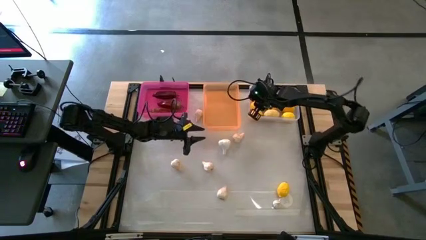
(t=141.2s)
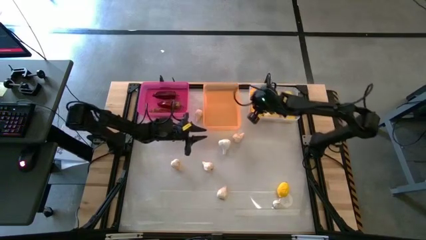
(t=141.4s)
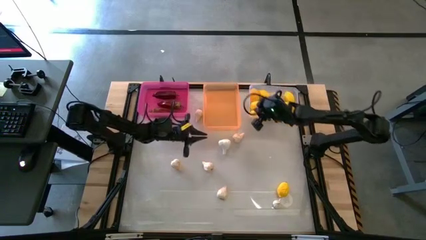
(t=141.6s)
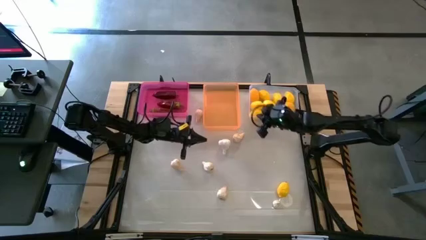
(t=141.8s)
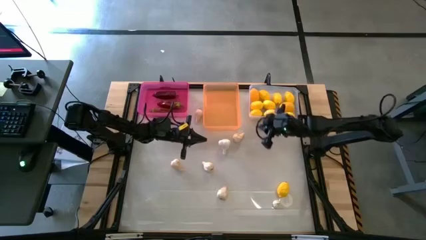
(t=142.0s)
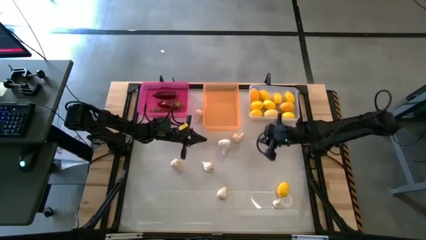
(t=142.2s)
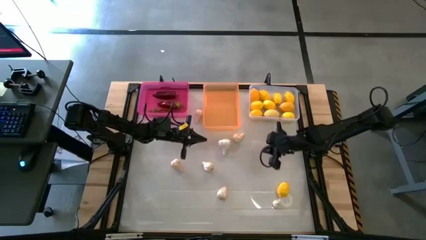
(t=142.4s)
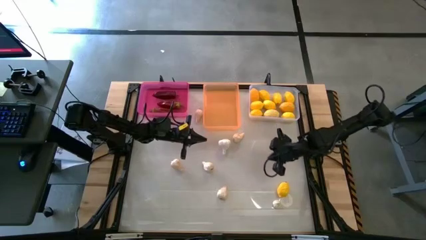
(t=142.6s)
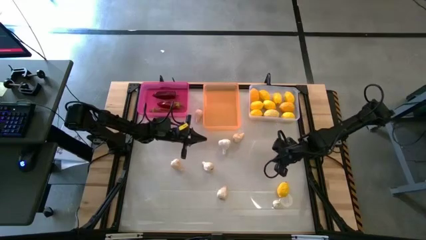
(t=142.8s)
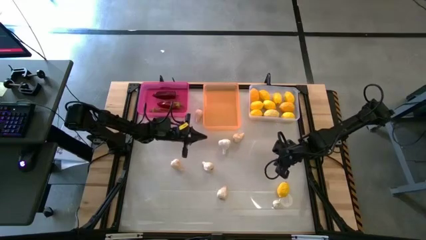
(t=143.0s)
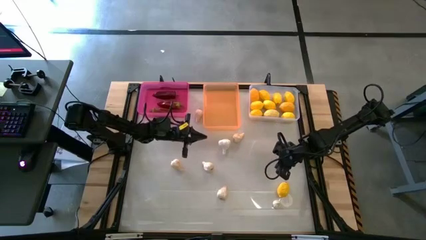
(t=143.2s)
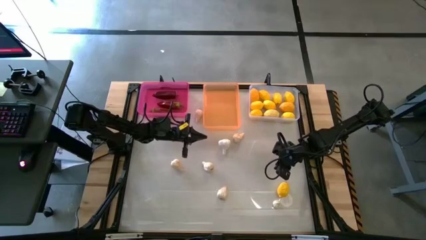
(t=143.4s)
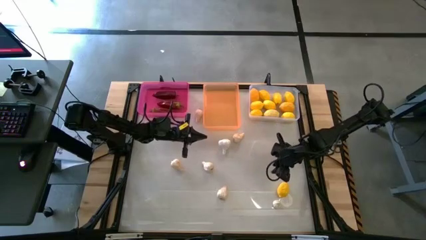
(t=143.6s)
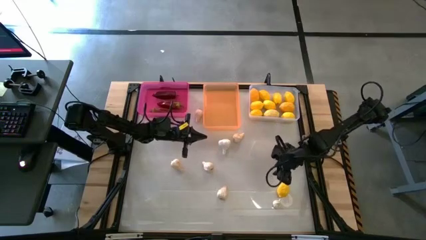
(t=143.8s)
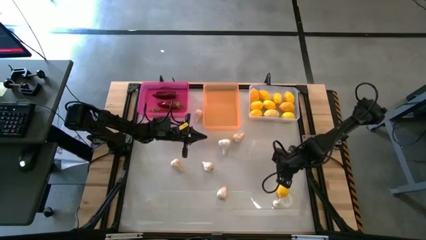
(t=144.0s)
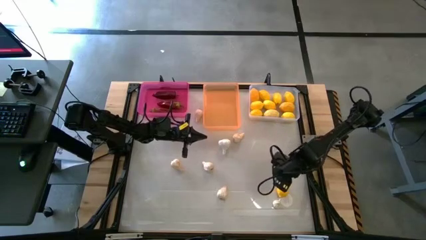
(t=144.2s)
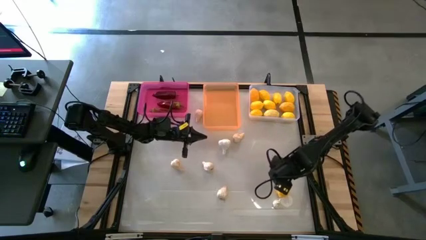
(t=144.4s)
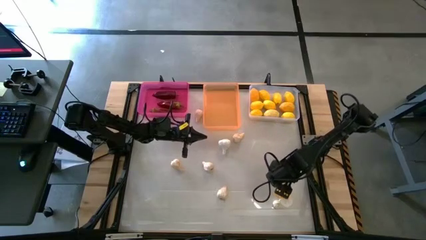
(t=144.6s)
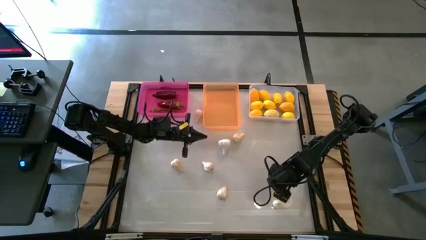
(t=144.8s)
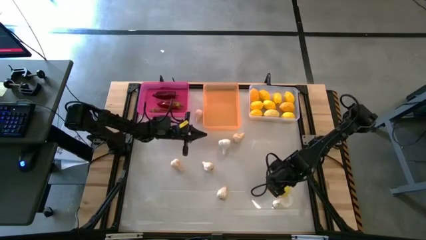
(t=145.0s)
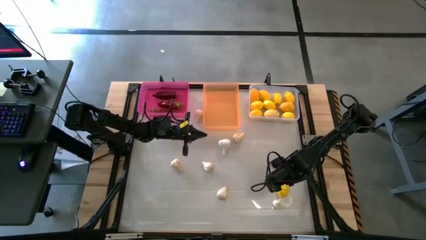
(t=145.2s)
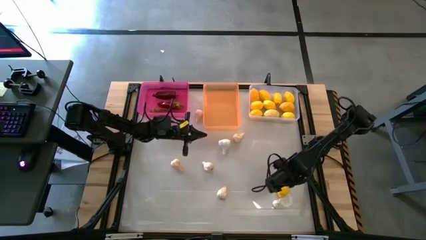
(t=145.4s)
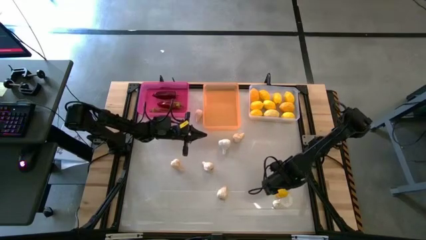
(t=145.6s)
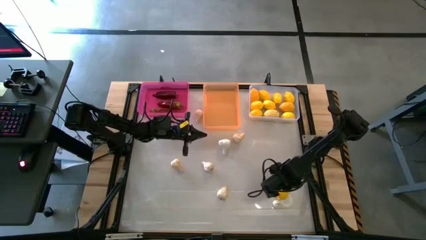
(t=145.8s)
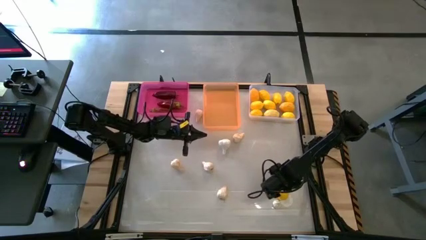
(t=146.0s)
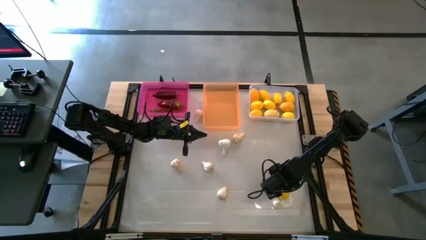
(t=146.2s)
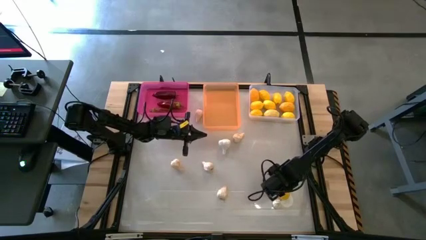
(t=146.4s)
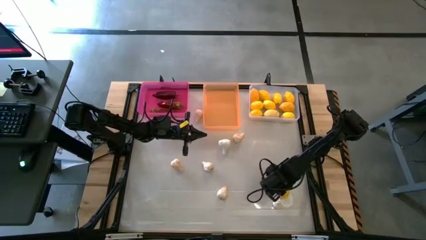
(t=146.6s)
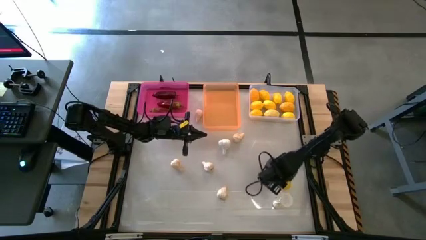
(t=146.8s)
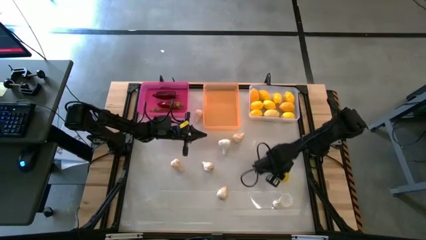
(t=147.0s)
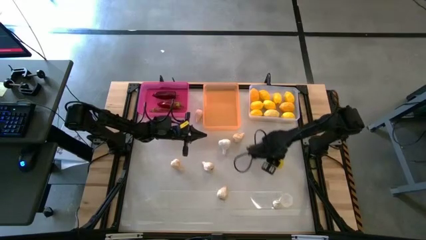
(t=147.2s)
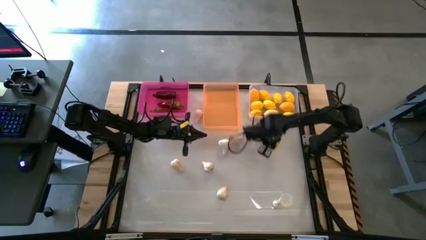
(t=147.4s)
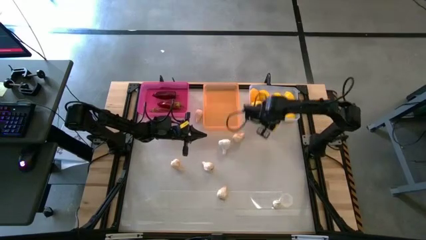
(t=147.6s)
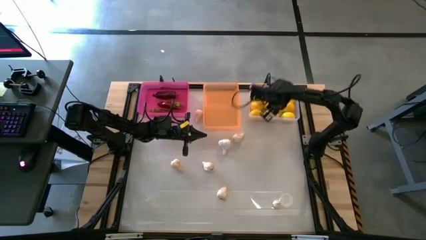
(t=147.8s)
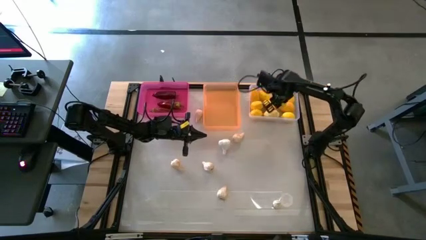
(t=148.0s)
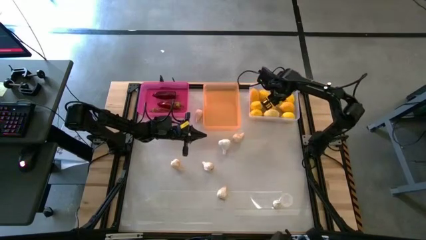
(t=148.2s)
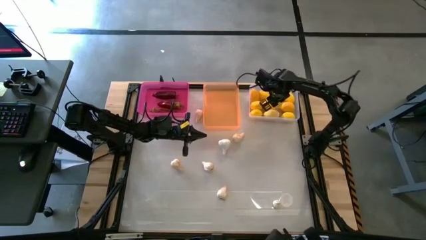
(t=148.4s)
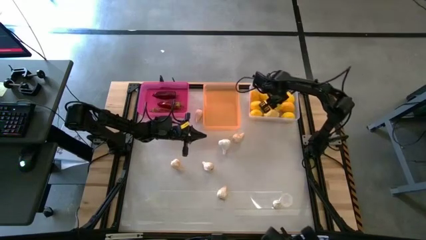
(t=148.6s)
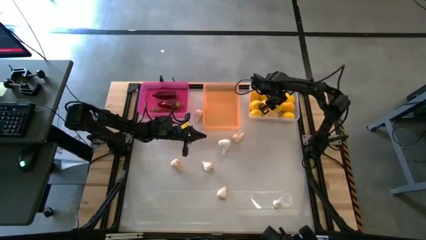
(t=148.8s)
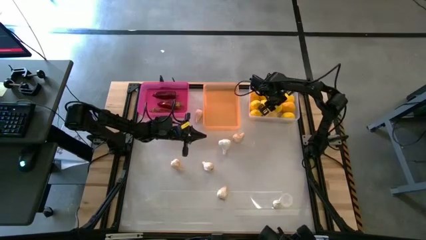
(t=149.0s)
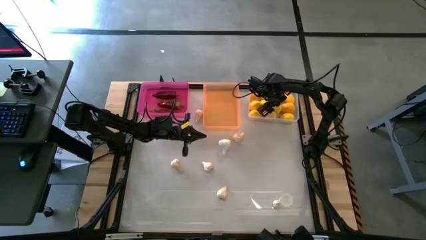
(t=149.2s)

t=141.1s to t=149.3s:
Task: Sort produce into baskets
Put the yellow lemon into the transparent bin

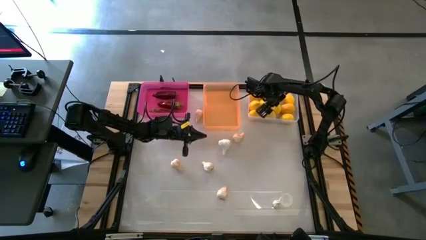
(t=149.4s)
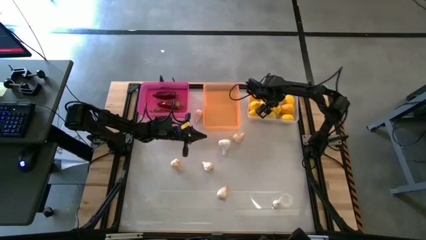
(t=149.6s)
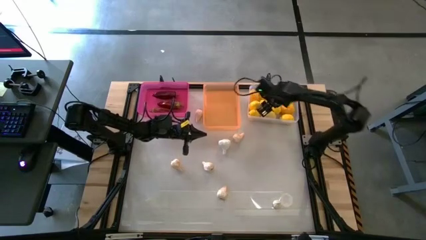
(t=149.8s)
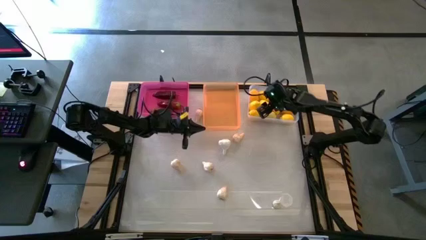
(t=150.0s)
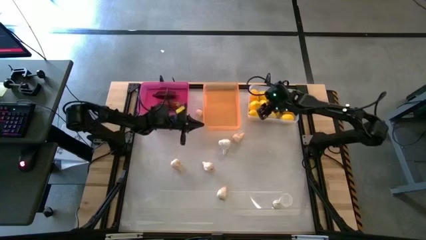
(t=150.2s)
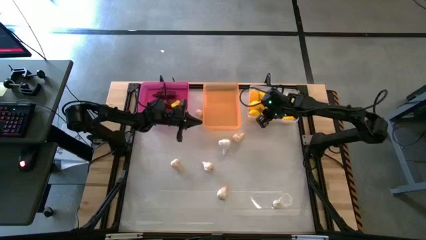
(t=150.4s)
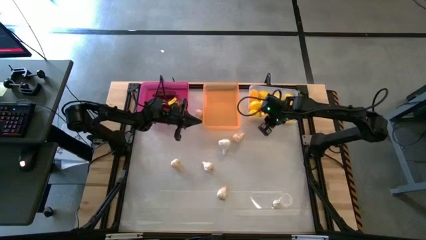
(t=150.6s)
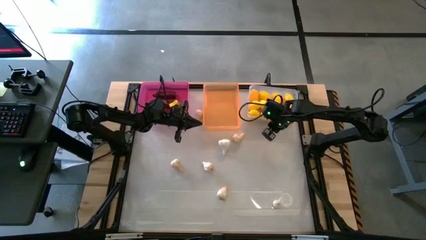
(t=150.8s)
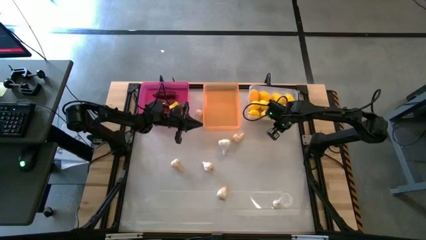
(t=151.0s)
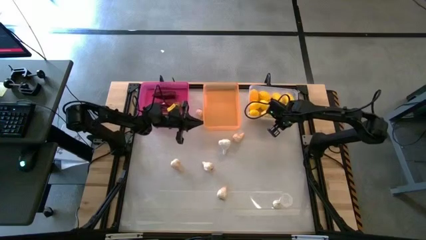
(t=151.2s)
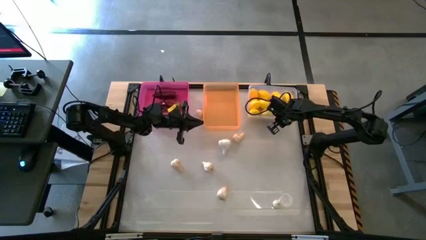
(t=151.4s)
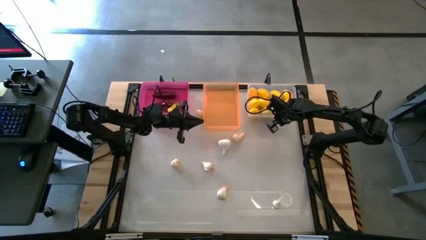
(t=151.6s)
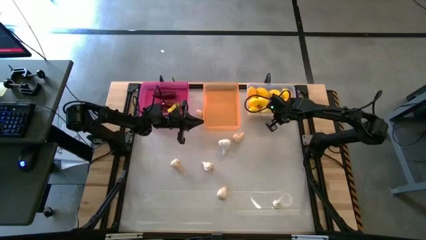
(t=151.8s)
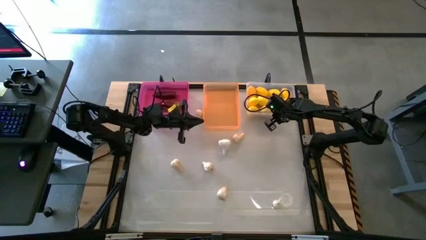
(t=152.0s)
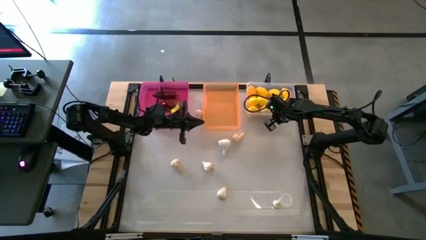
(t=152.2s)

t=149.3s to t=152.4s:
Adjust the transparent bin

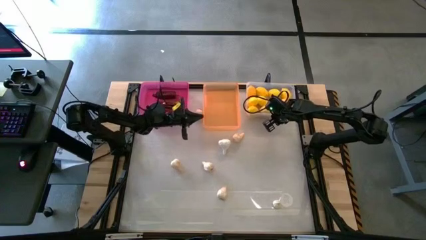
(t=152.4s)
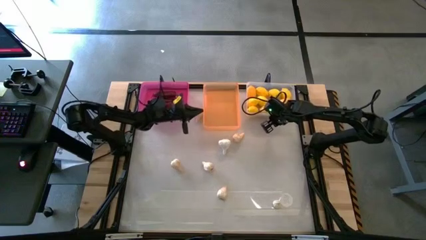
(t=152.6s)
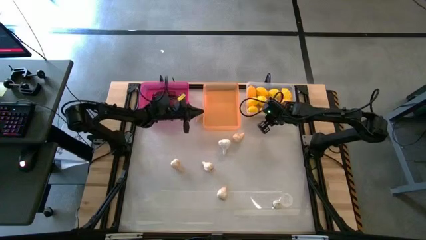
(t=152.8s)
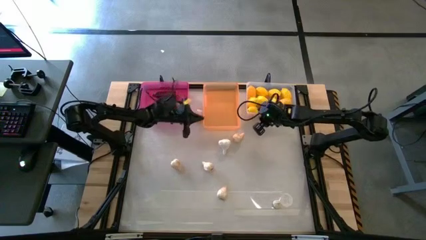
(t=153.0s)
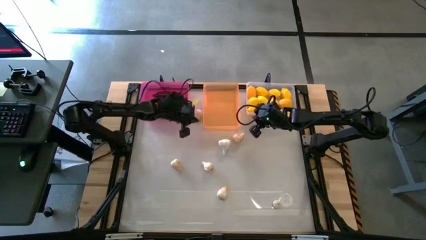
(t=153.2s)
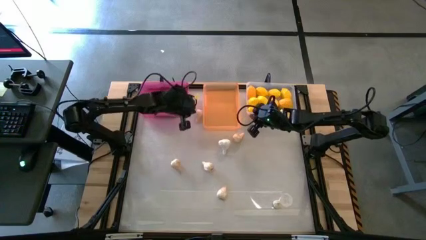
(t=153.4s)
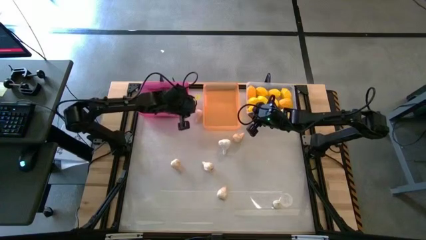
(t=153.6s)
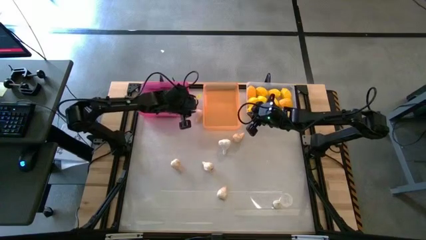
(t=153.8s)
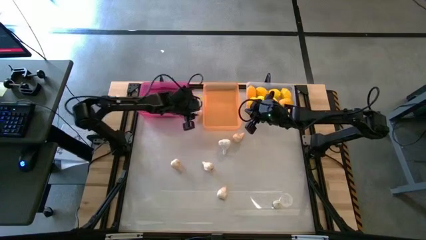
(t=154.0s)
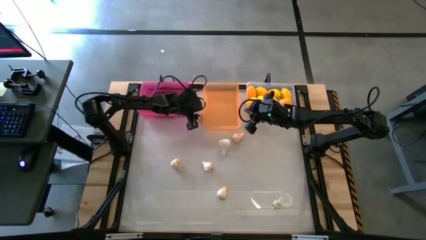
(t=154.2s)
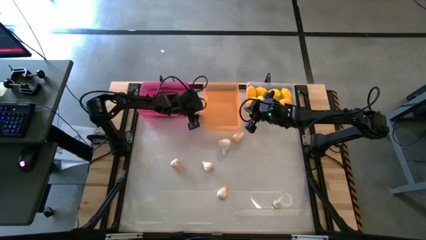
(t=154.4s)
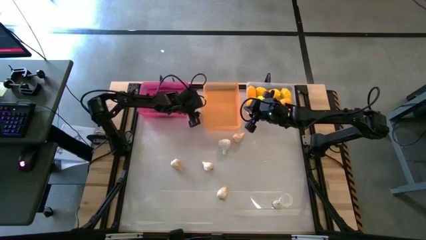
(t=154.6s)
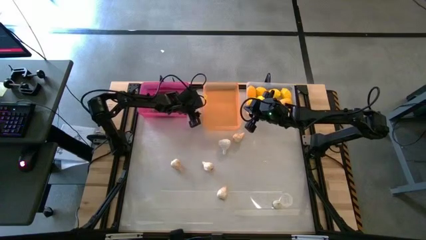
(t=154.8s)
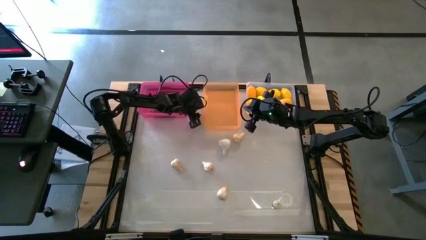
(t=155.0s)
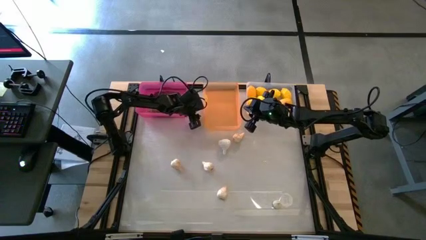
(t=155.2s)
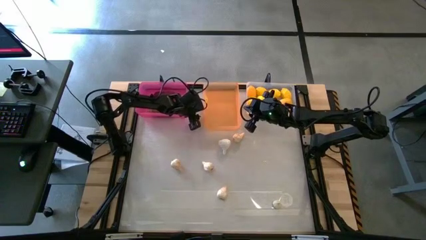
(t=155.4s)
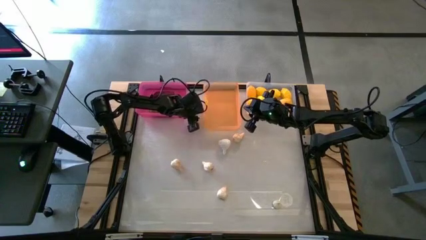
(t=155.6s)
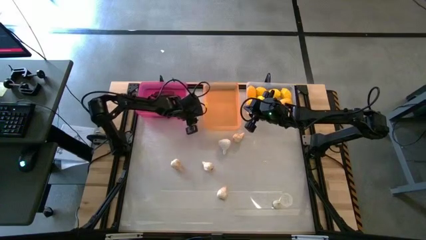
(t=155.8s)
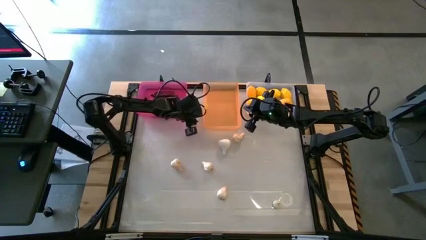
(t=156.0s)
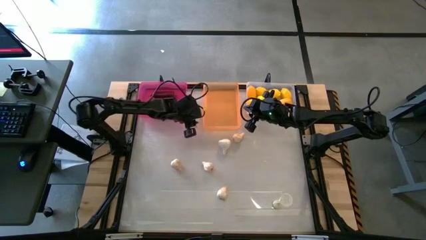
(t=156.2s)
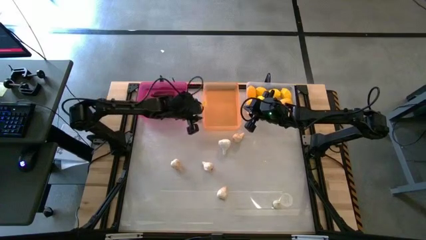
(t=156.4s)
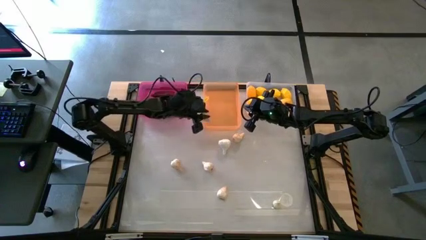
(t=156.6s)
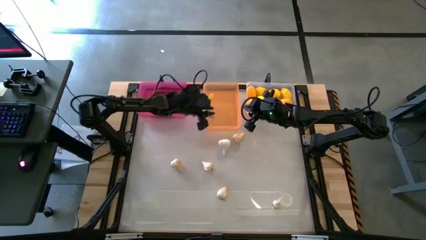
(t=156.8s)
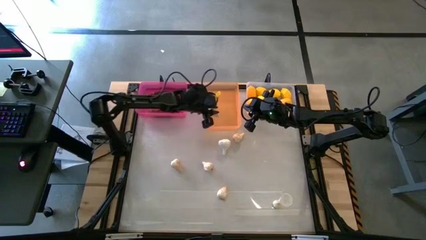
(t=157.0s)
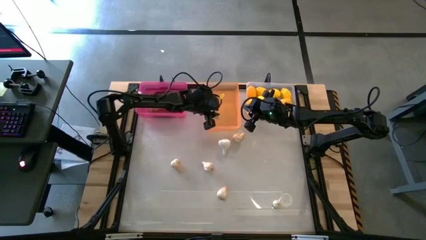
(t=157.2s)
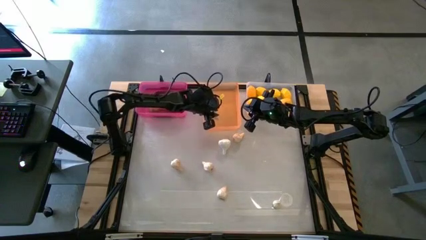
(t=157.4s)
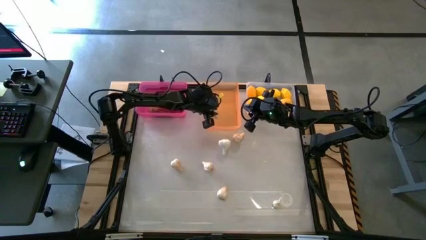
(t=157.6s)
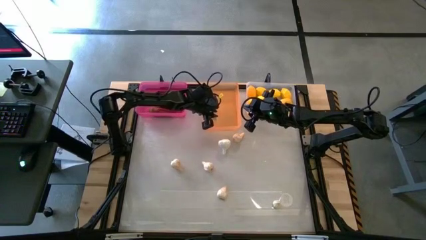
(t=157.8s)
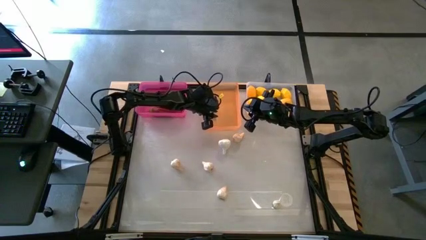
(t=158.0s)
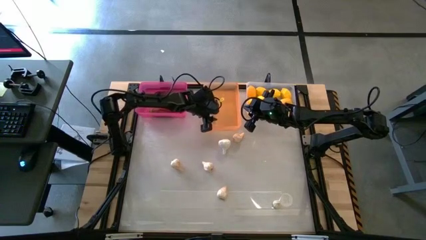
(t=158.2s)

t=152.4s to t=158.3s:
Put the white garlic into the orange bin
